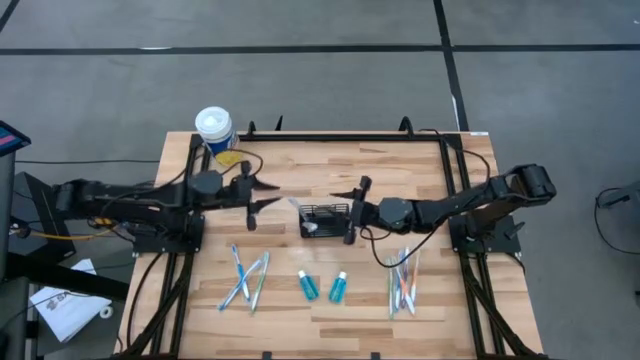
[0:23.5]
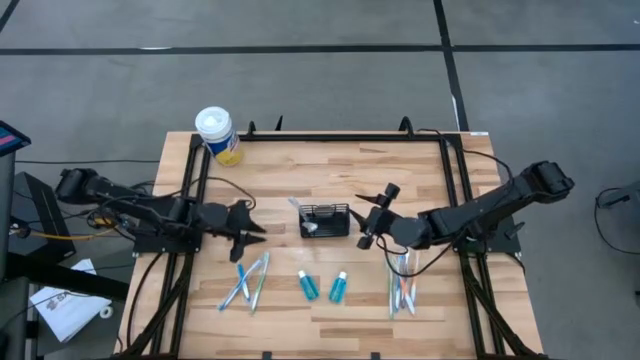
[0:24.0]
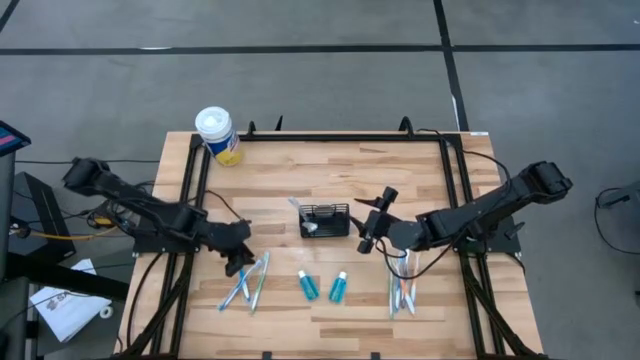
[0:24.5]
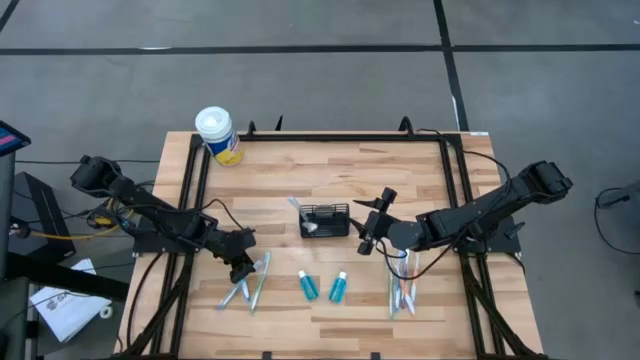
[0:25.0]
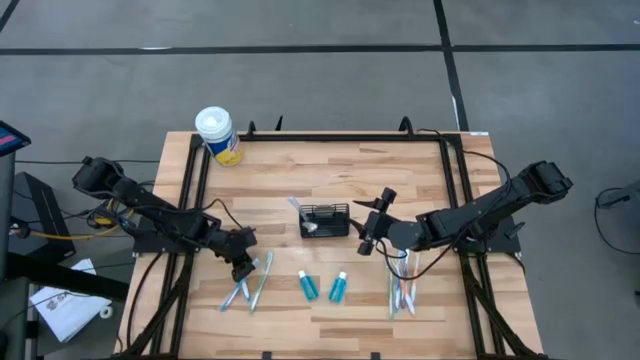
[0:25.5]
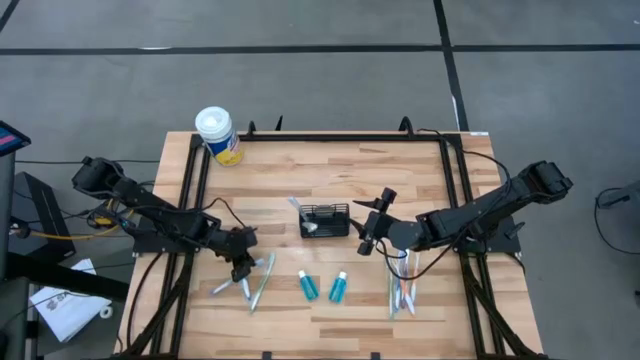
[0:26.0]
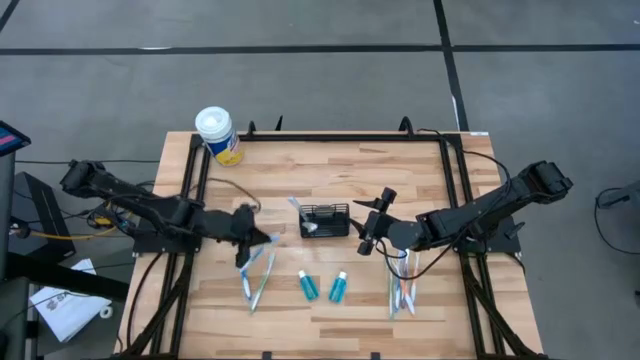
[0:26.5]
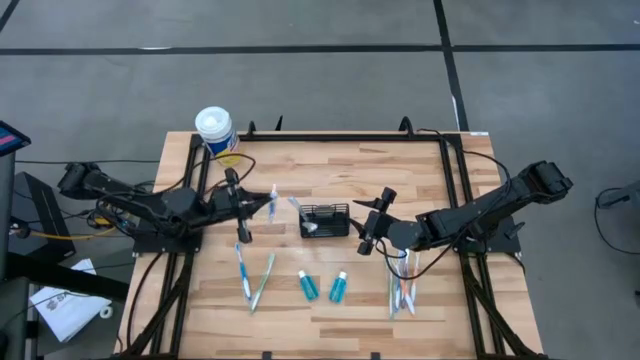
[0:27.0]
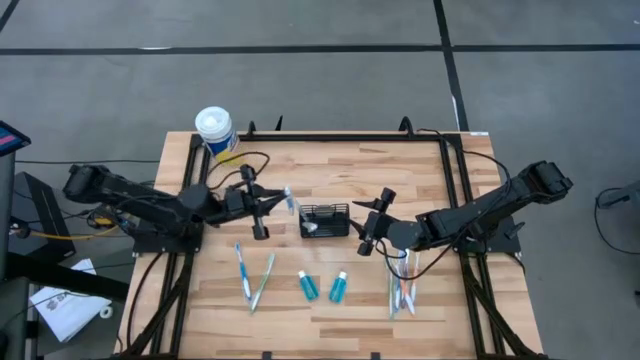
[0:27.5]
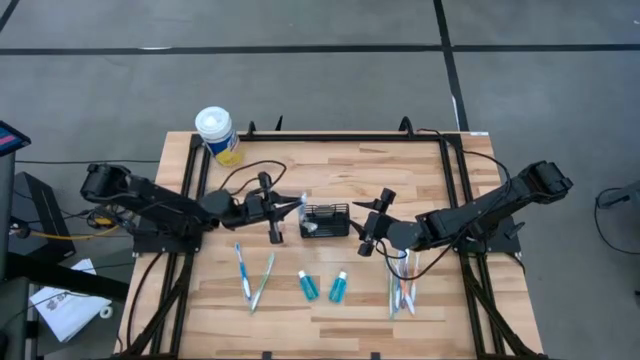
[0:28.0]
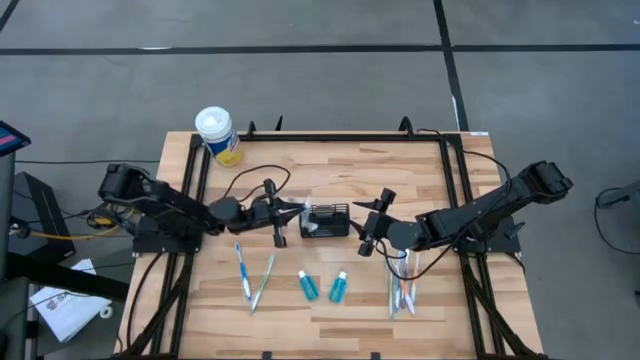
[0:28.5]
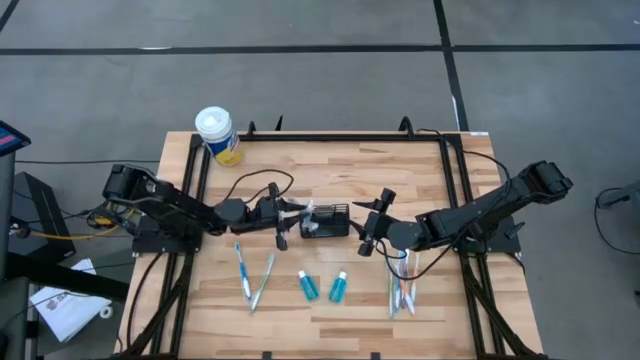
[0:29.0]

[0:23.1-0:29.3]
Task: Pick & Place toothbrushing station
Put the blue toothbrush into the mesh

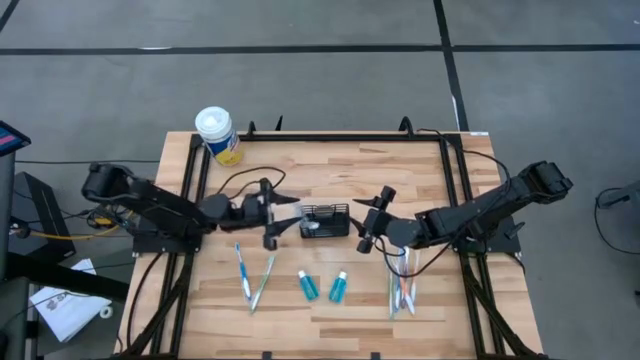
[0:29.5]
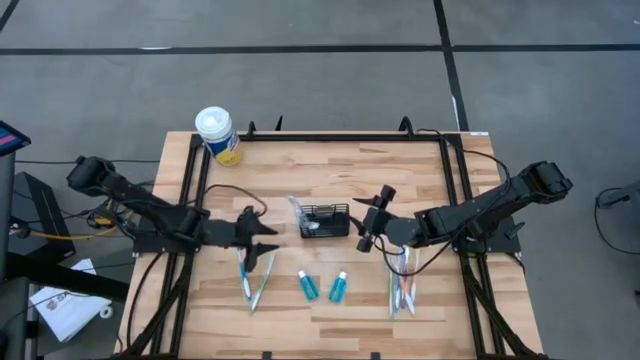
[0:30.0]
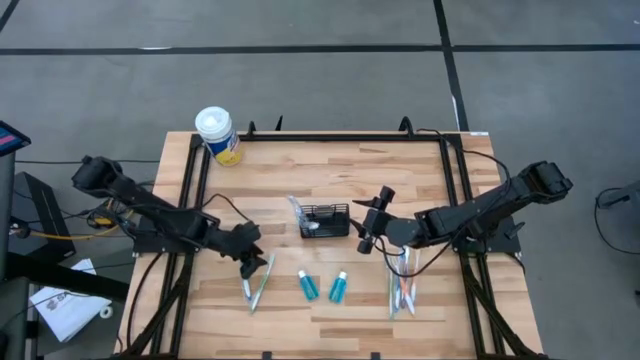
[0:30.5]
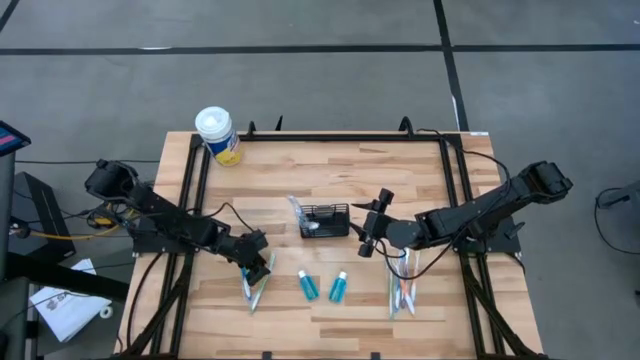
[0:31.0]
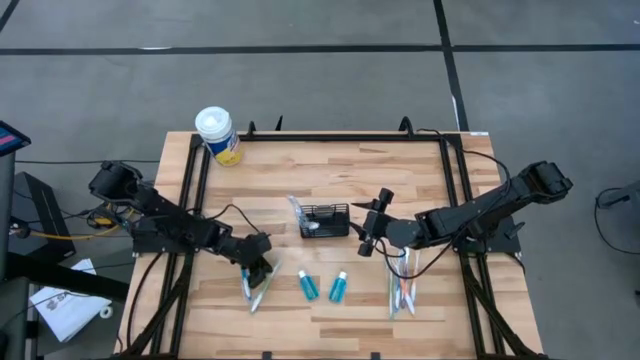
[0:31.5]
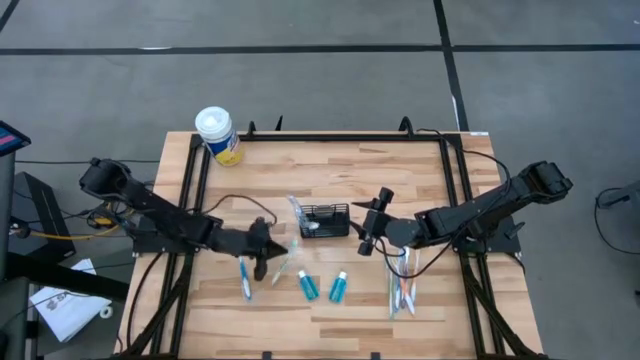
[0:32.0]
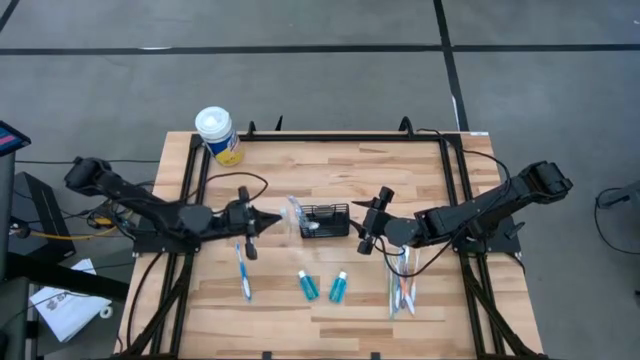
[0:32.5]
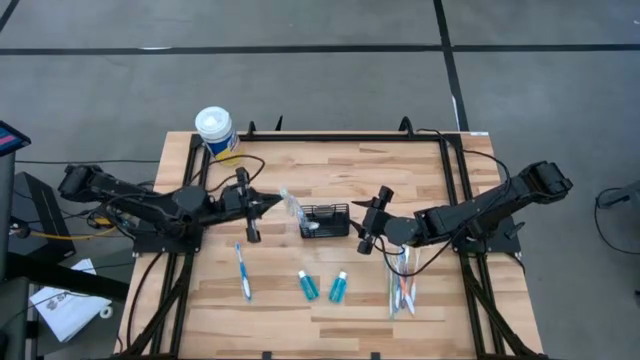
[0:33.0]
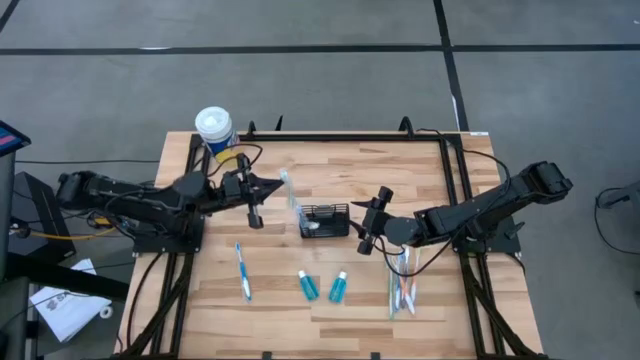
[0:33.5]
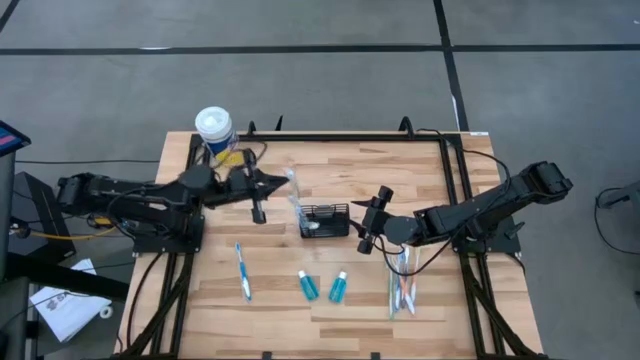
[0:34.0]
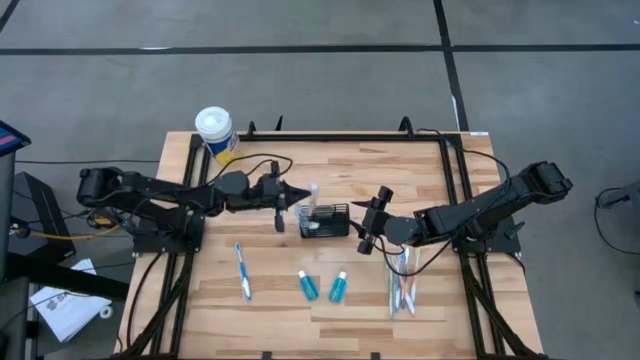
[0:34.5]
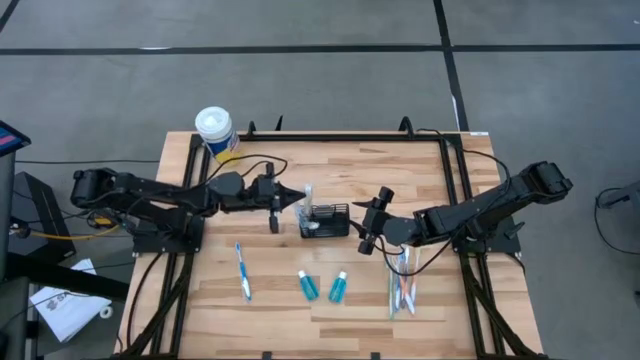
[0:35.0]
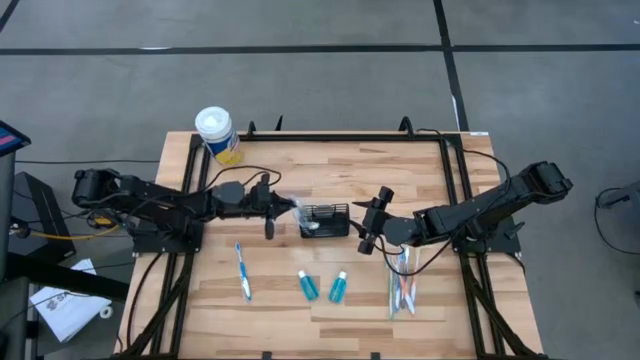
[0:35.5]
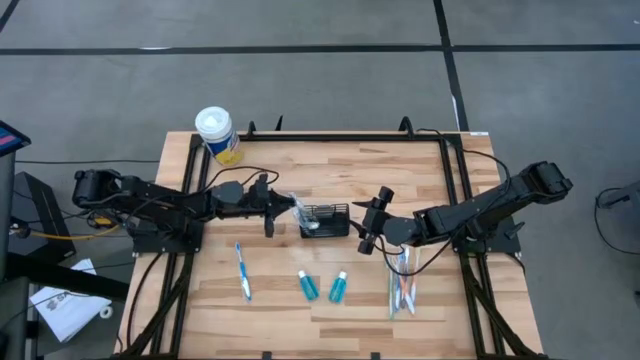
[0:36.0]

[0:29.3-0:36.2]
Put the green toothbrush into the mesh

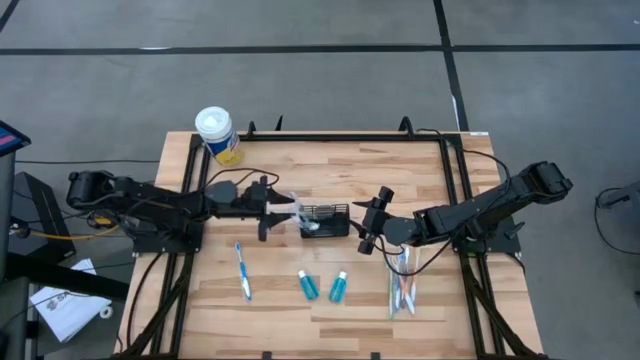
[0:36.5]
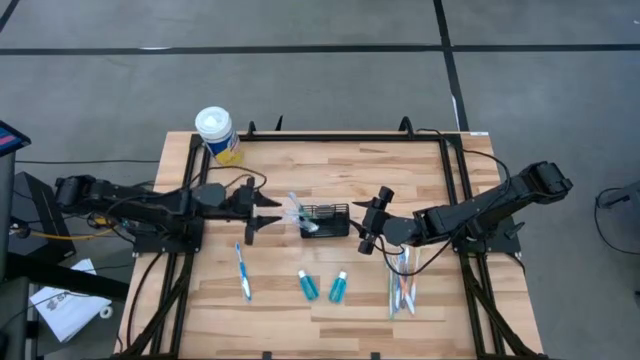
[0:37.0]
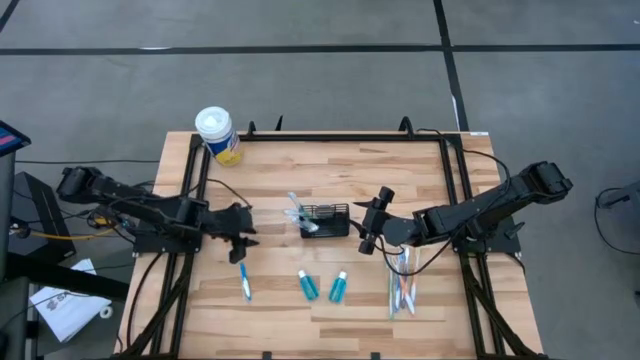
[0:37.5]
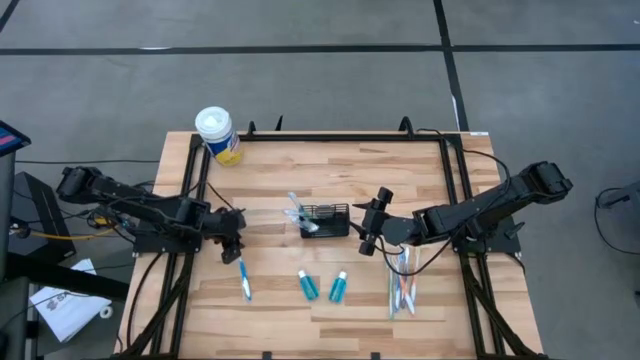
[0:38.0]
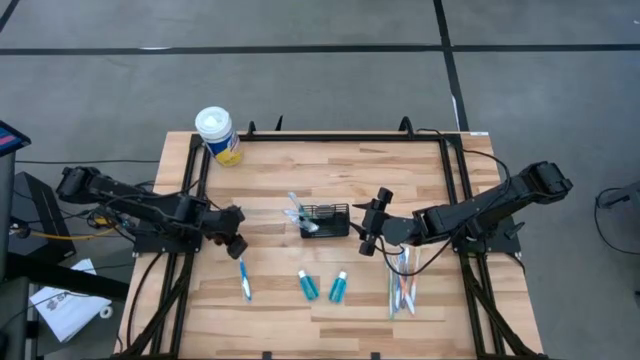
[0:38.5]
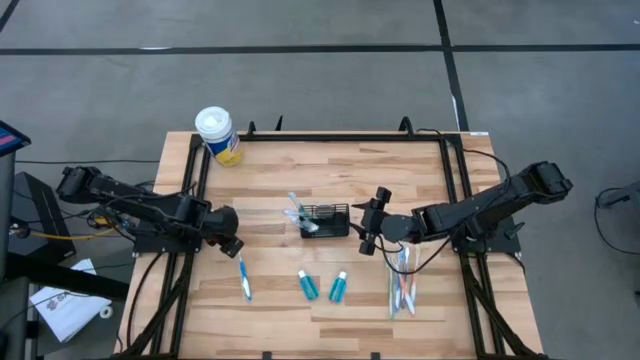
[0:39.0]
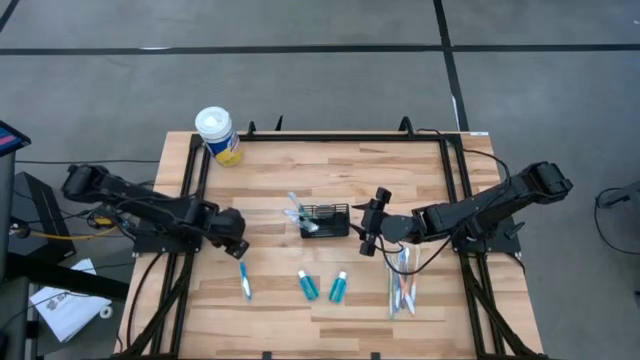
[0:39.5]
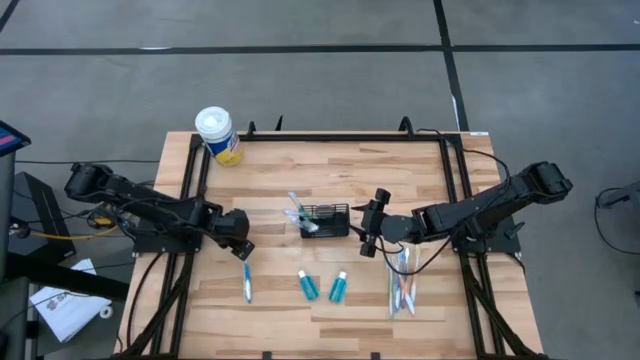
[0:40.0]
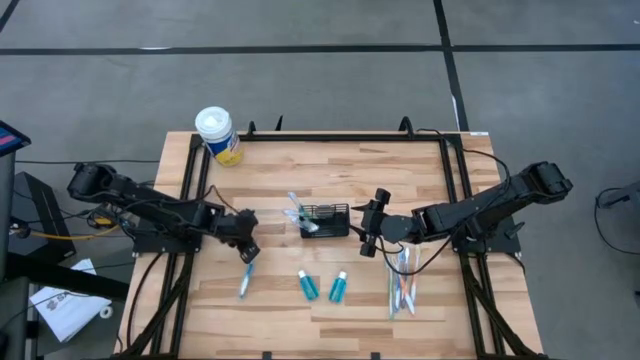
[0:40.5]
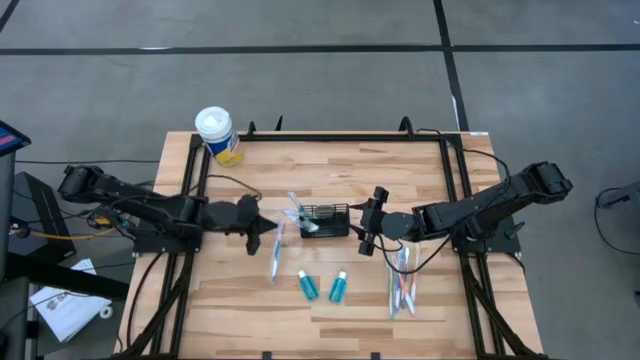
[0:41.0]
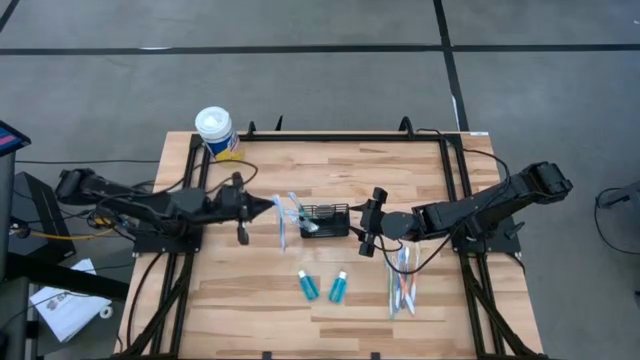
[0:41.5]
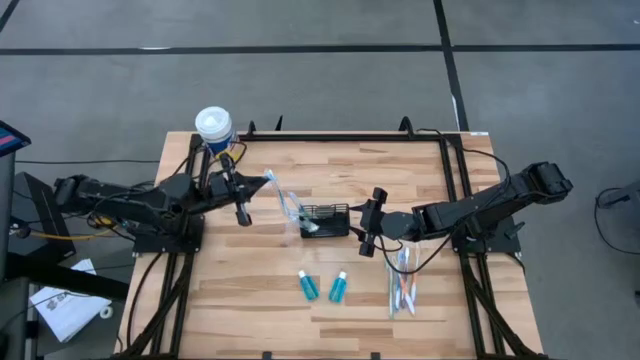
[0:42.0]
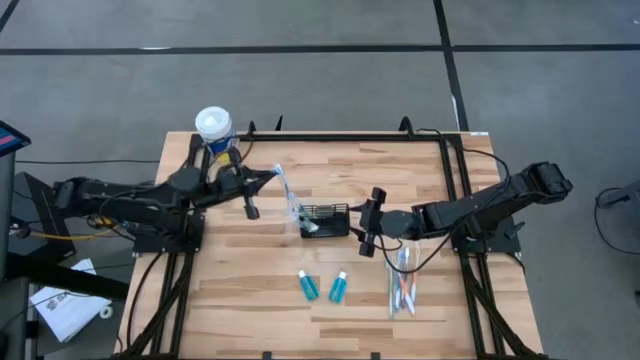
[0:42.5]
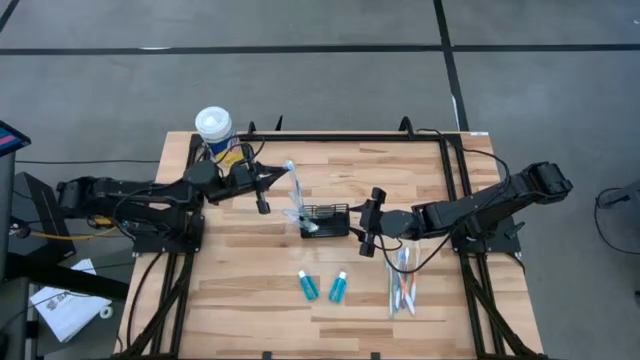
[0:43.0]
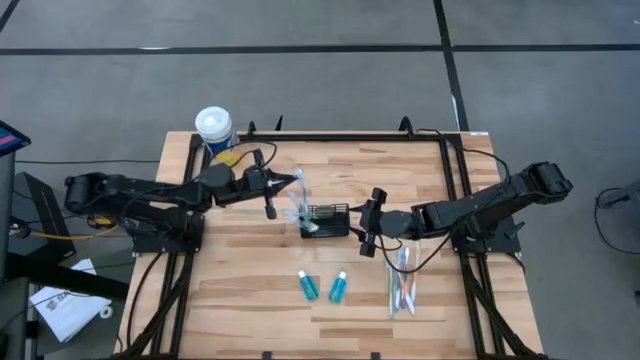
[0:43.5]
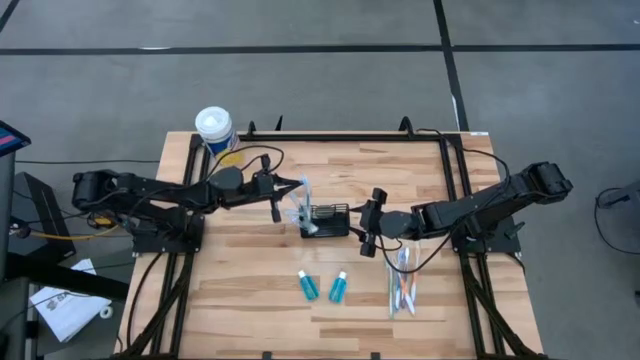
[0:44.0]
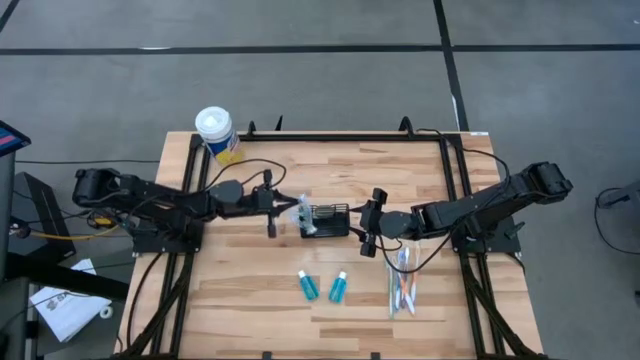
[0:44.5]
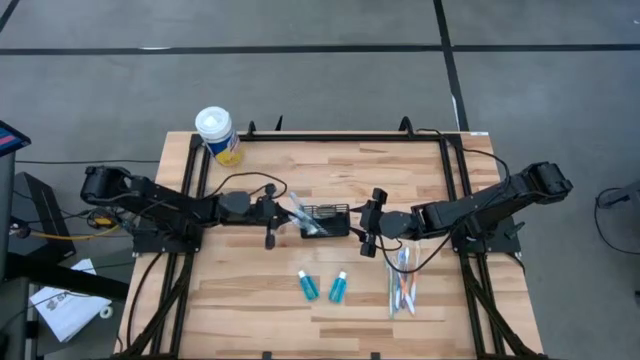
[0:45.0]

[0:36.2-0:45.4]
Put the blue toothbrush into the mesh
